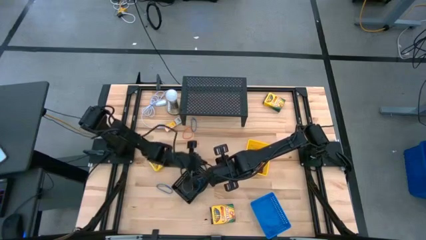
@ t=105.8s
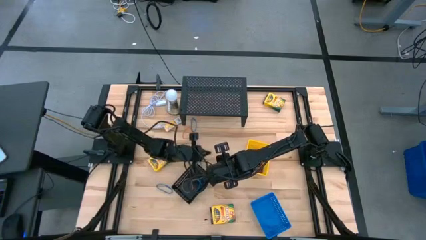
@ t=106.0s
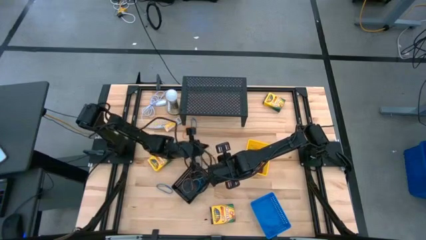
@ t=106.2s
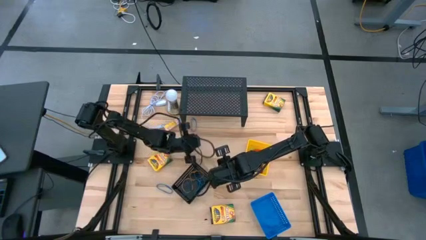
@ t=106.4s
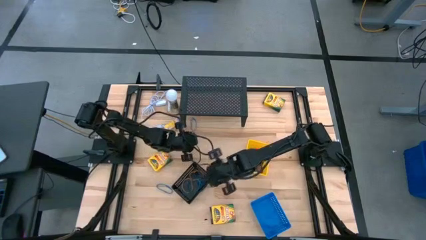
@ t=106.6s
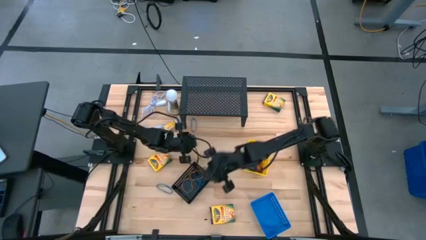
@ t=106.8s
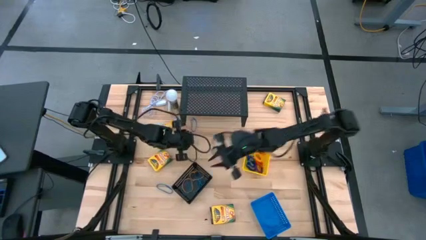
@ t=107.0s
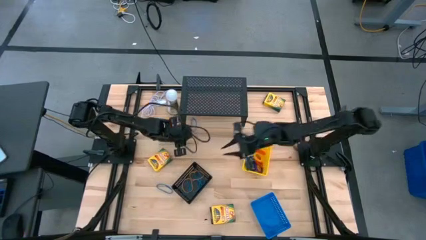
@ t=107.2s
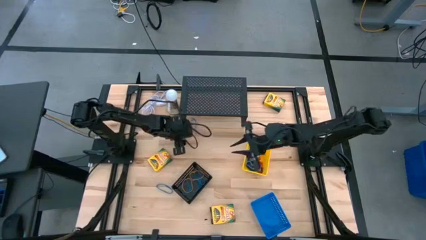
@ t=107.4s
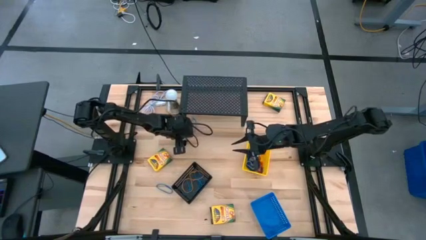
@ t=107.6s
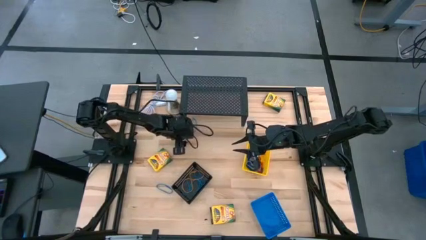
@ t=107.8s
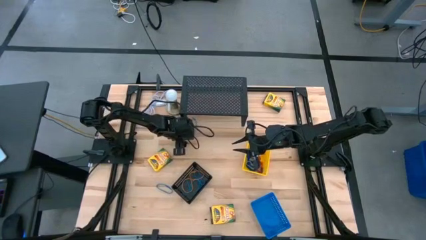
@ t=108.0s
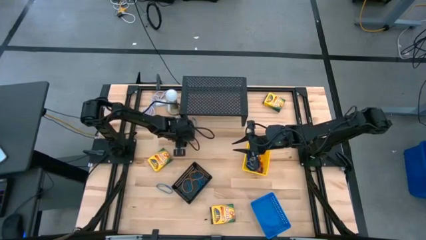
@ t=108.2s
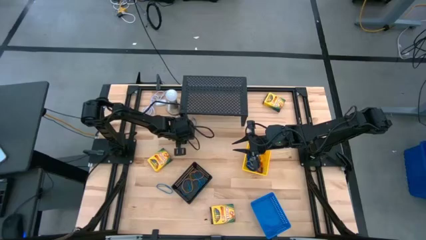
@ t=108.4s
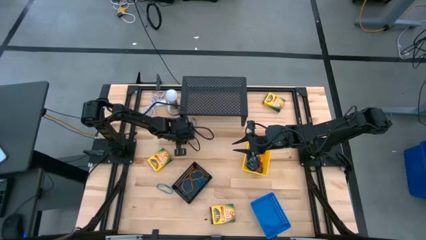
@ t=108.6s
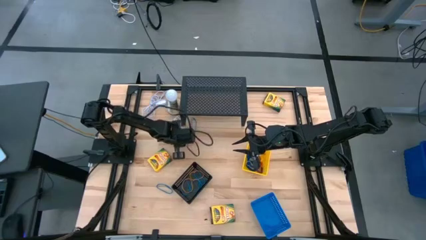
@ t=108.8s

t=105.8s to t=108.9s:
Task: Pick & Place Office Desk Supplies
Put the orange rubber band into the black basket

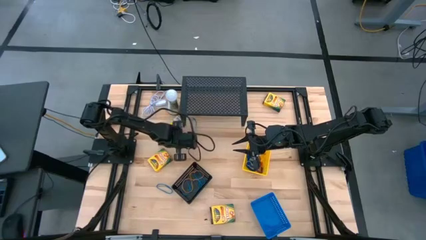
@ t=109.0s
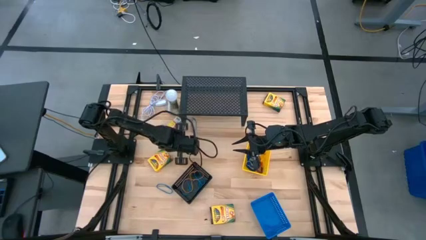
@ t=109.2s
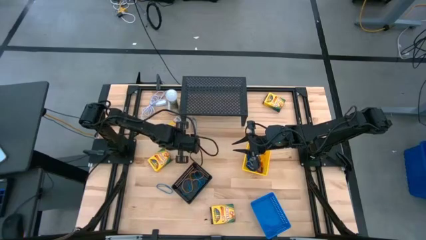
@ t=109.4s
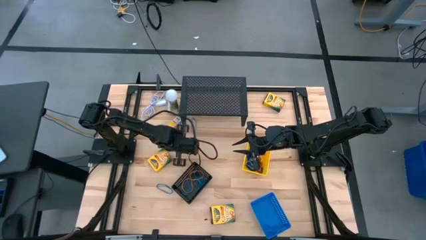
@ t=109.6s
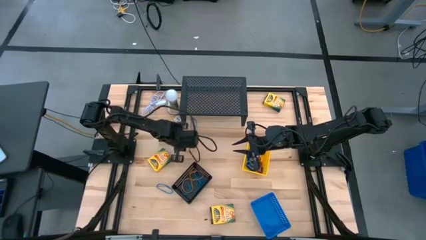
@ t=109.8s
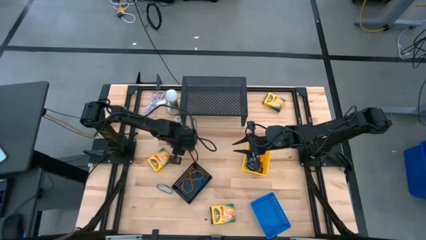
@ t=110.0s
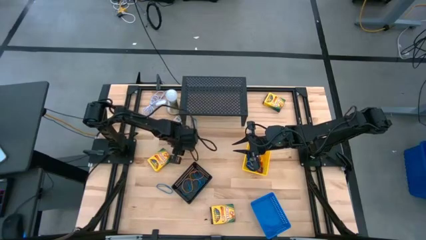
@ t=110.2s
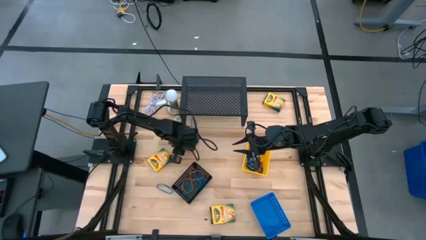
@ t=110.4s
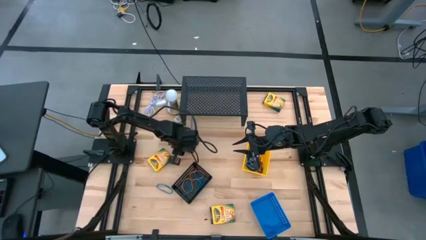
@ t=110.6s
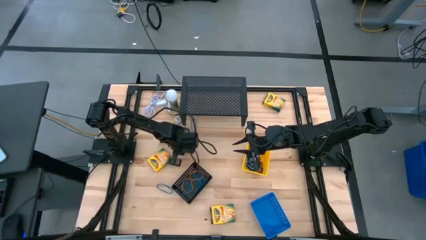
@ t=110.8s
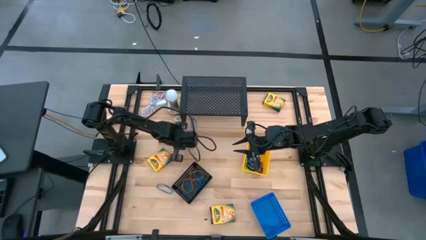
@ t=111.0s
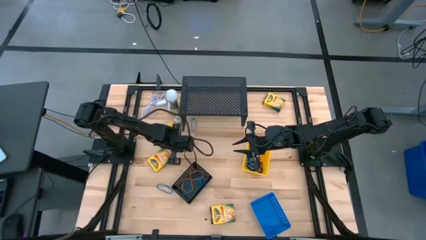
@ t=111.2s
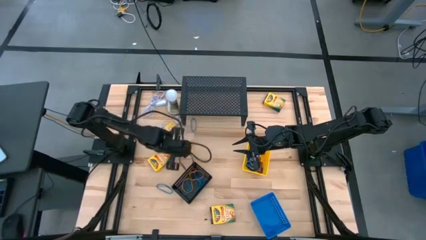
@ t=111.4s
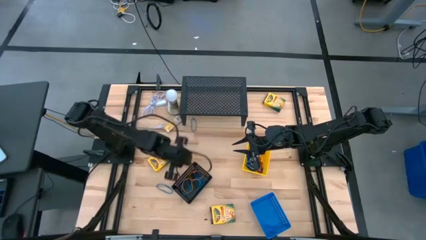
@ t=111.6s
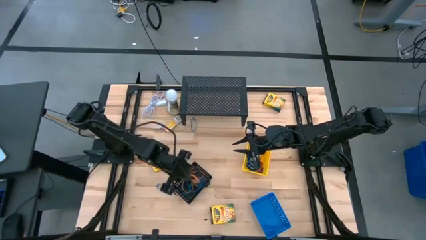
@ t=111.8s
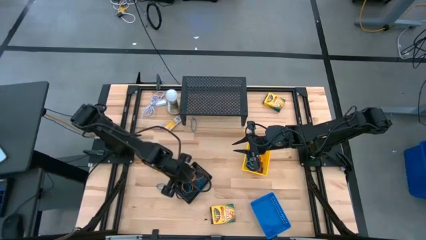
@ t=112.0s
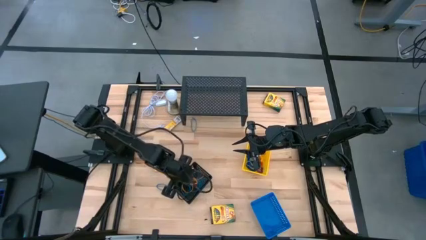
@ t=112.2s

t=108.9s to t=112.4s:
Put the orange rubber band into the black basket

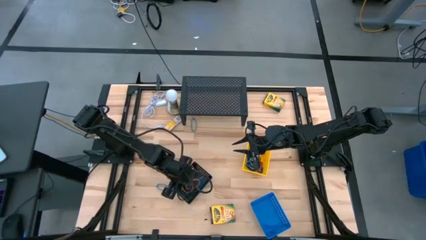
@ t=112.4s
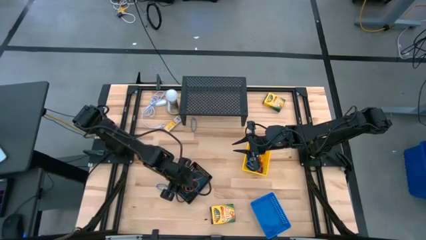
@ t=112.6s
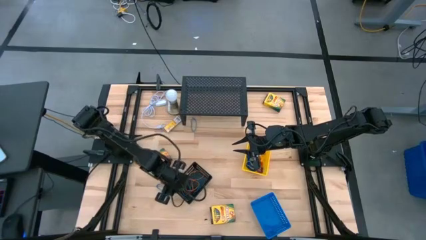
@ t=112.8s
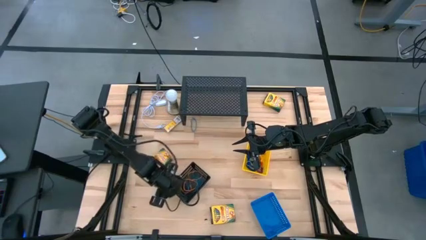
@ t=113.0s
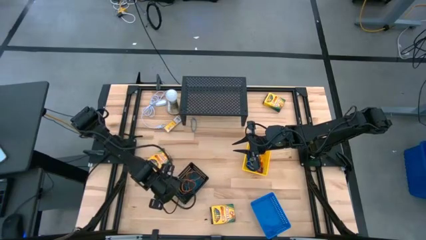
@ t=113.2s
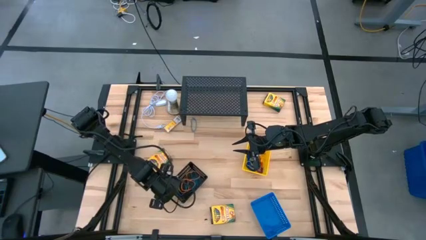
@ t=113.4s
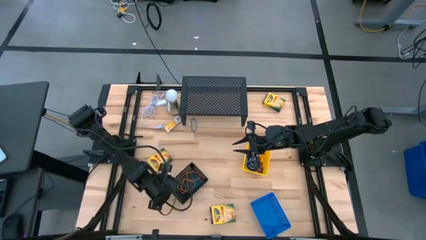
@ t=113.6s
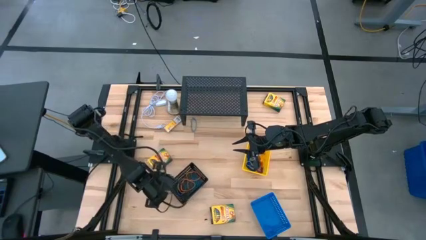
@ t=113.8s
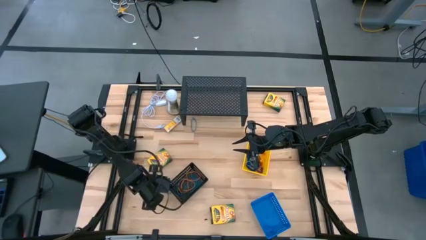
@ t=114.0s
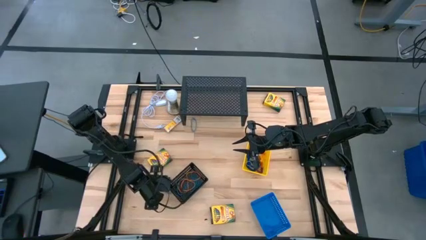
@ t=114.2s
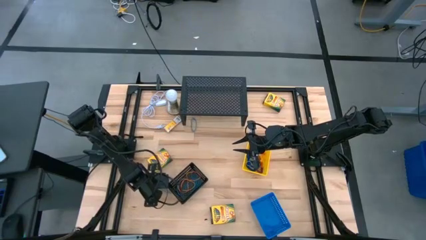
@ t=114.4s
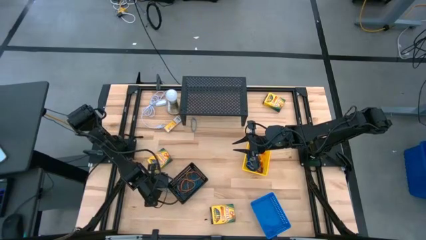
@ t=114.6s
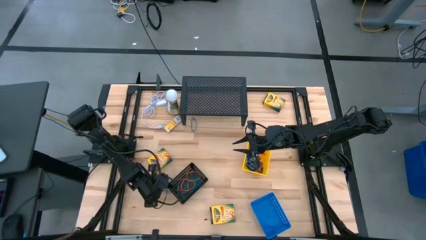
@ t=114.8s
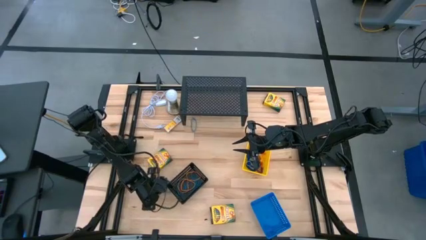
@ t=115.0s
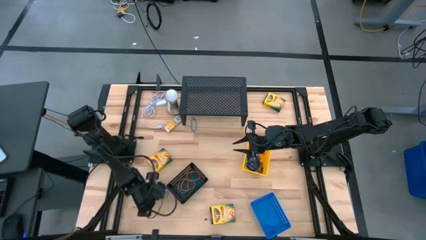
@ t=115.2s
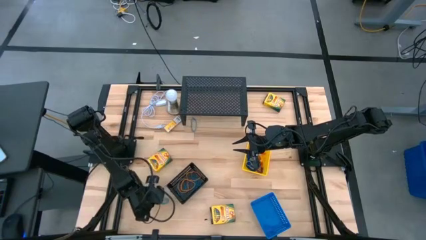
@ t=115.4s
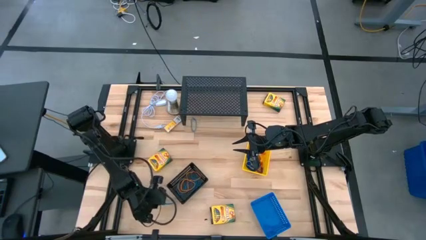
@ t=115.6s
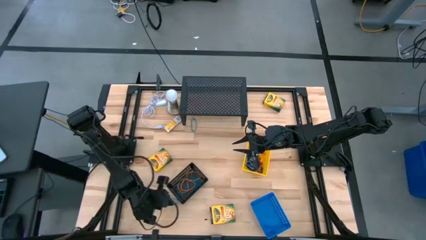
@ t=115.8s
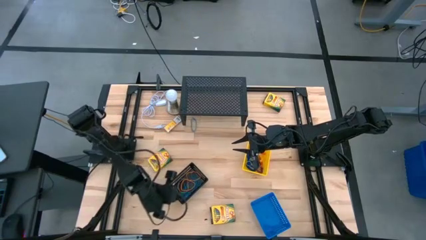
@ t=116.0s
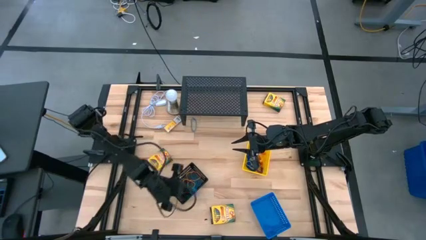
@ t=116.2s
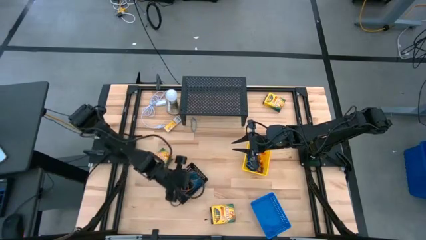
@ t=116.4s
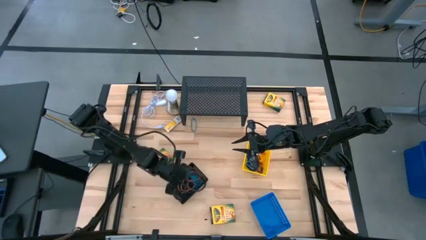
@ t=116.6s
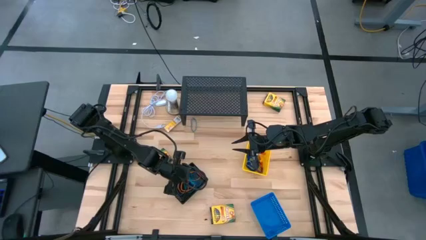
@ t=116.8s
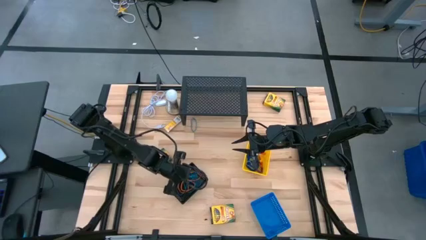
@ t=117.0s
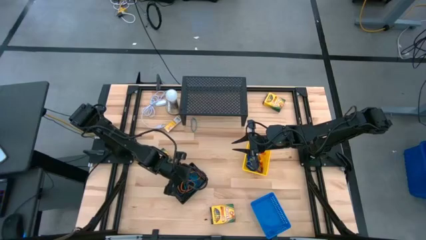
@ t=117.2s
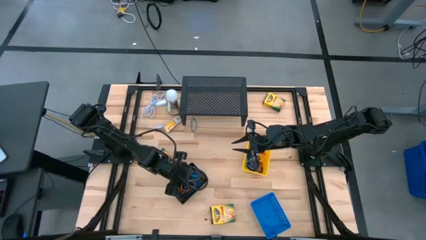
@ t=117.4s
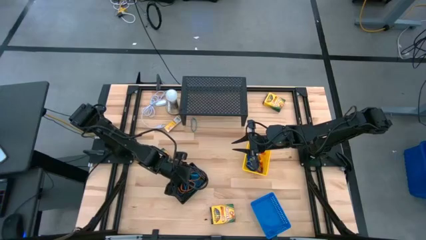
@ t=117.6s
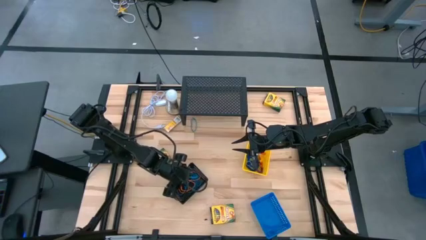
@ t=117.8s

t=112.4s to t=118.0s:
Put the blue rubber band into the black basket

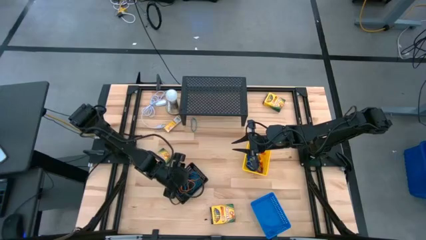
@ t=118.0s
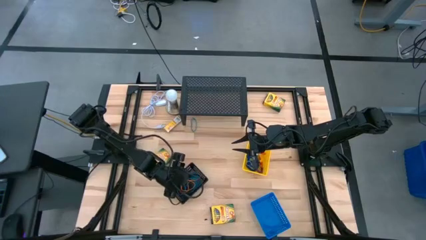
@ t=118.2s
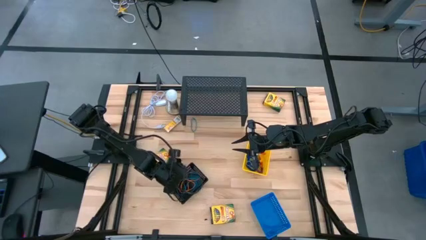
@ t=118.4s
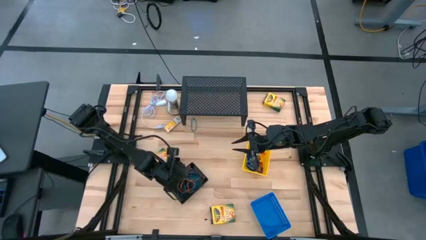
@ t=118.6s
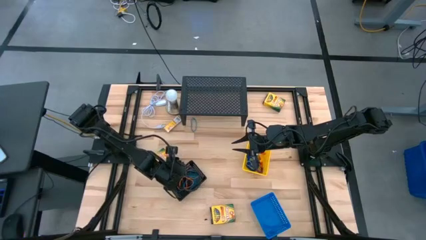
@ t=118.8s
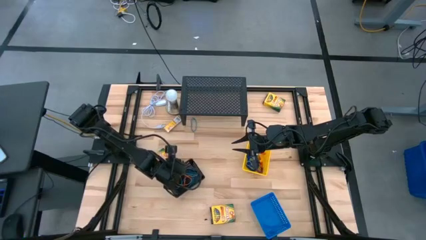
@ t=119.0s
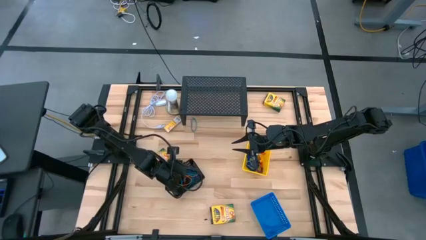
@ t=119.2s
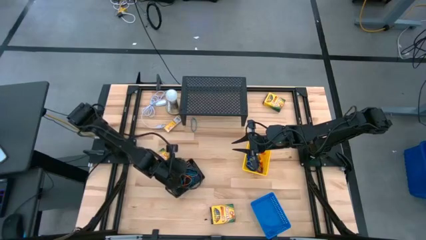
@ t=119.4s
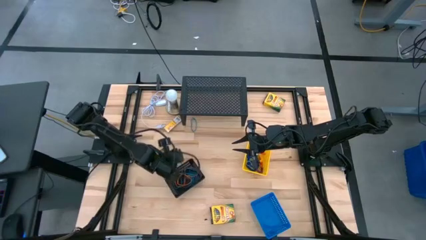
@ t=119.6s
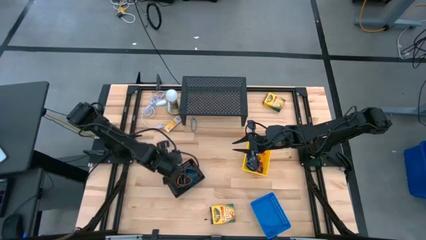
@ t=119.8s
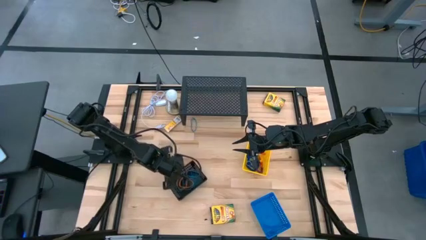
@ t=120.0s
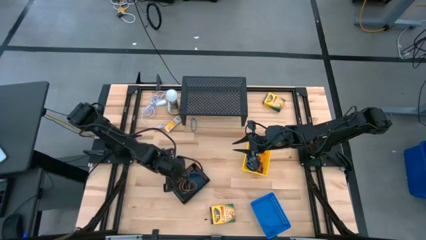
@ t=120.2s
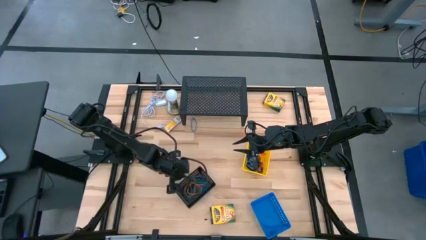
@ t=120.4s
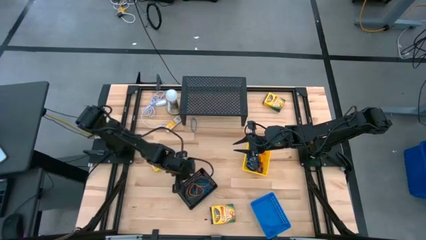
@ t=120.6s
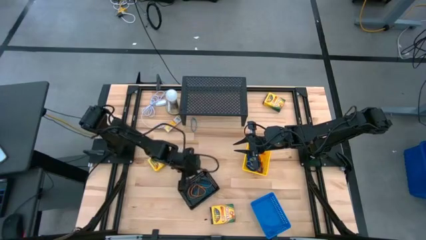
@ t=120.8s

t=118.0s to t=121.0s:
Adjust the black basket on the table
